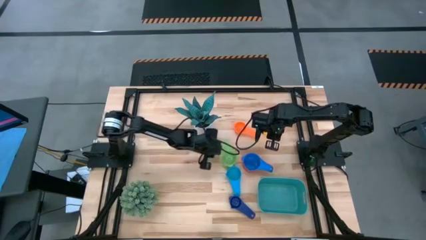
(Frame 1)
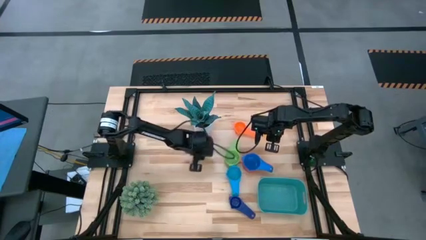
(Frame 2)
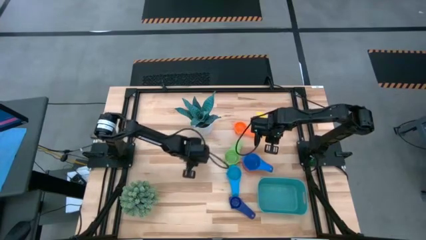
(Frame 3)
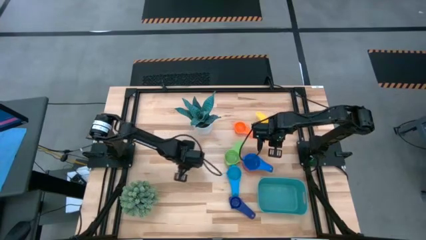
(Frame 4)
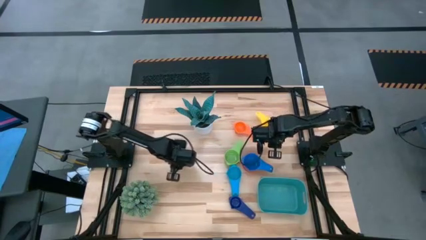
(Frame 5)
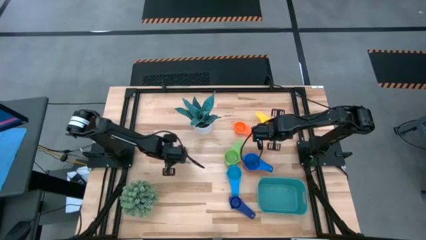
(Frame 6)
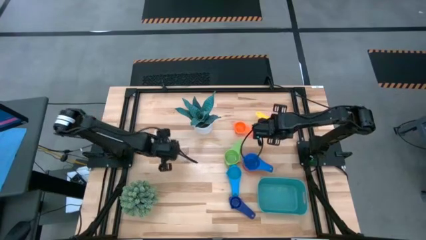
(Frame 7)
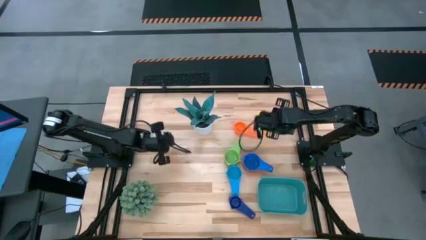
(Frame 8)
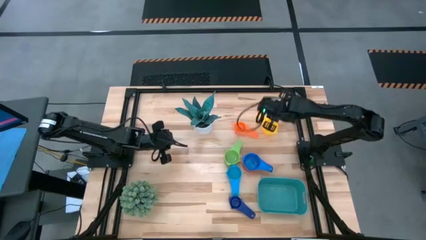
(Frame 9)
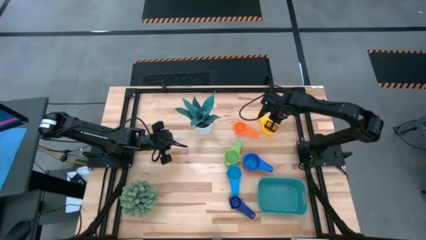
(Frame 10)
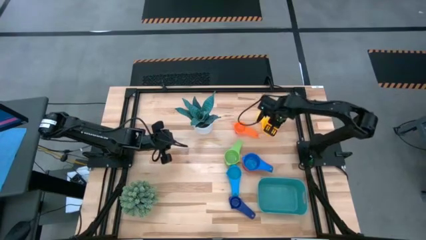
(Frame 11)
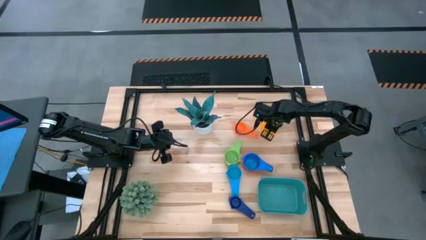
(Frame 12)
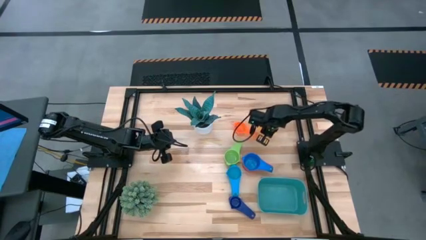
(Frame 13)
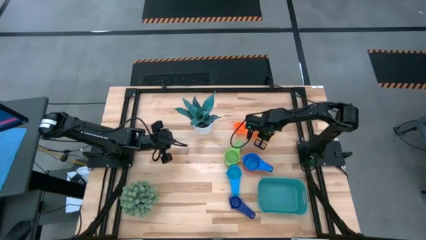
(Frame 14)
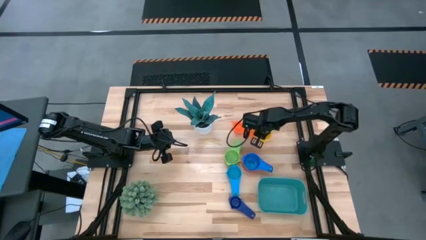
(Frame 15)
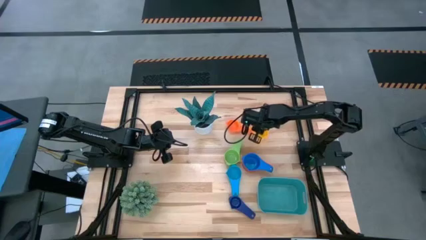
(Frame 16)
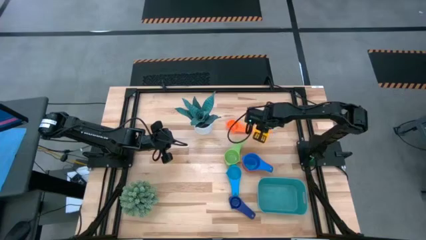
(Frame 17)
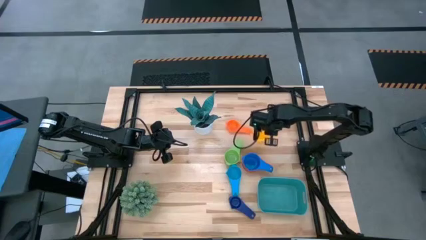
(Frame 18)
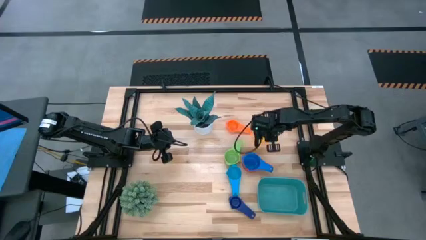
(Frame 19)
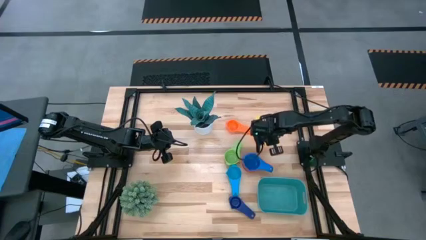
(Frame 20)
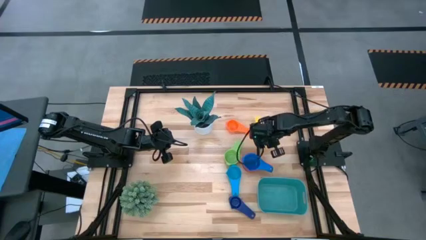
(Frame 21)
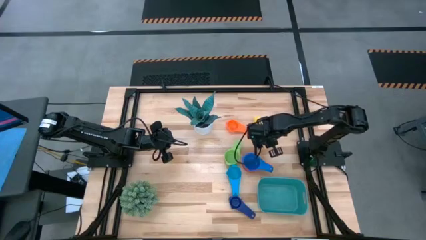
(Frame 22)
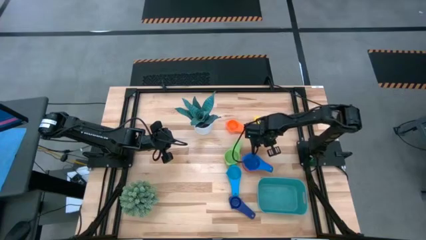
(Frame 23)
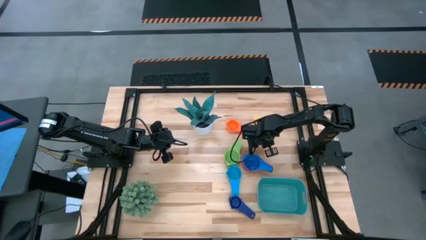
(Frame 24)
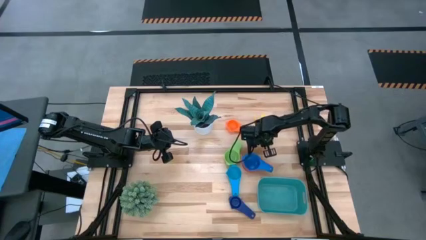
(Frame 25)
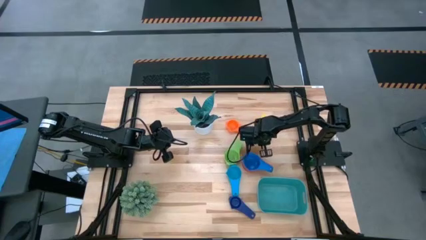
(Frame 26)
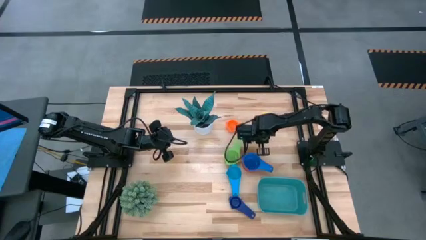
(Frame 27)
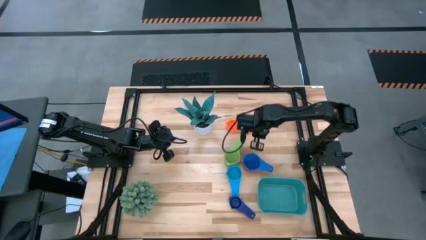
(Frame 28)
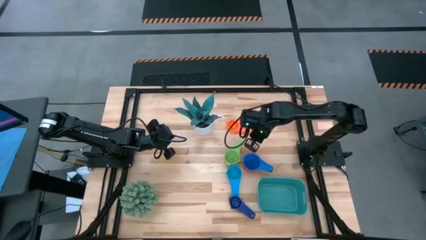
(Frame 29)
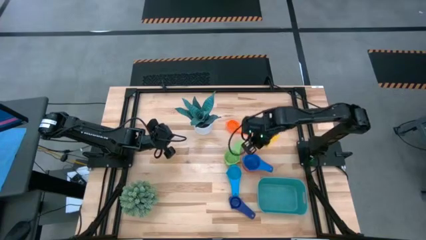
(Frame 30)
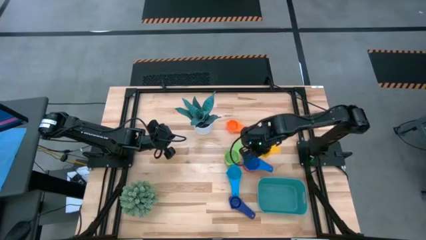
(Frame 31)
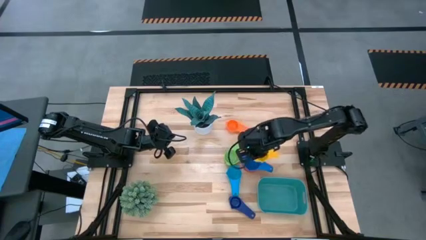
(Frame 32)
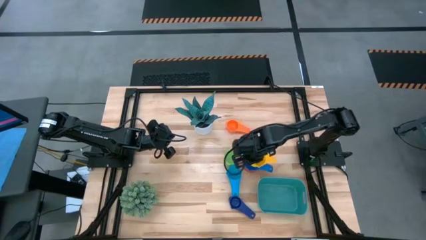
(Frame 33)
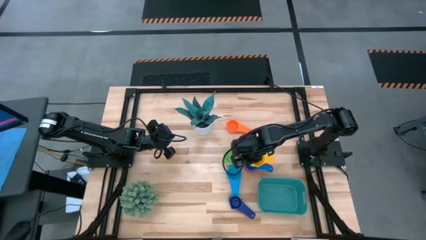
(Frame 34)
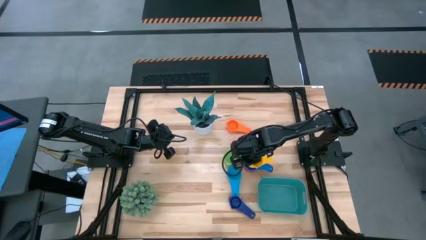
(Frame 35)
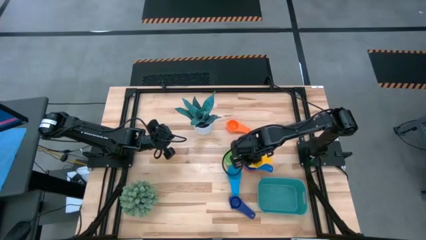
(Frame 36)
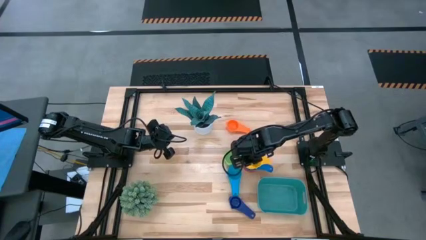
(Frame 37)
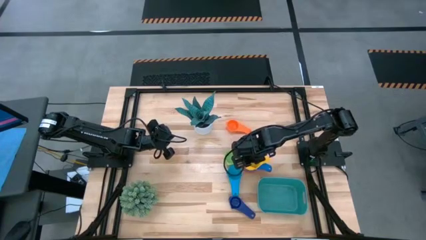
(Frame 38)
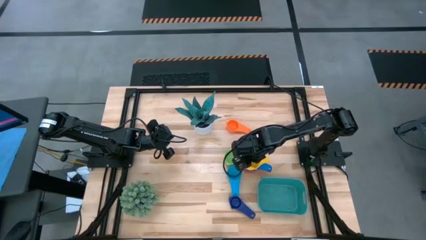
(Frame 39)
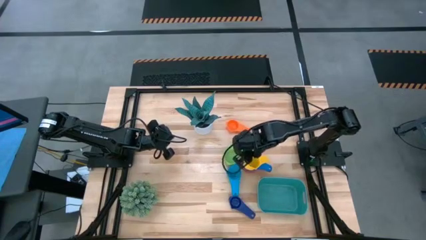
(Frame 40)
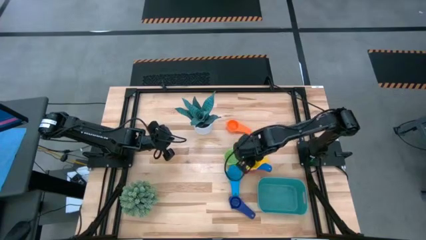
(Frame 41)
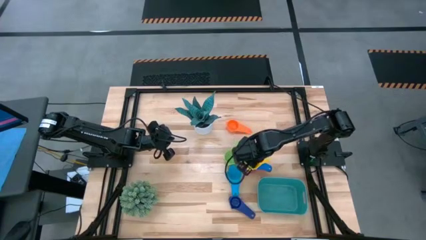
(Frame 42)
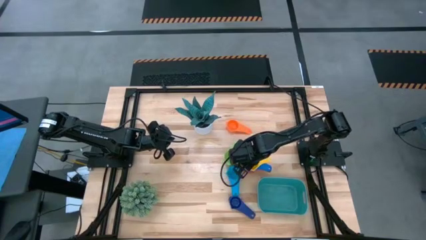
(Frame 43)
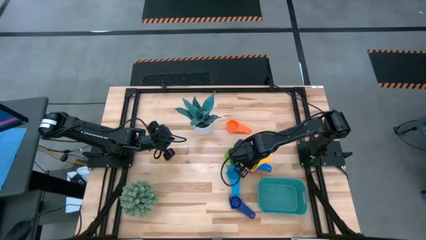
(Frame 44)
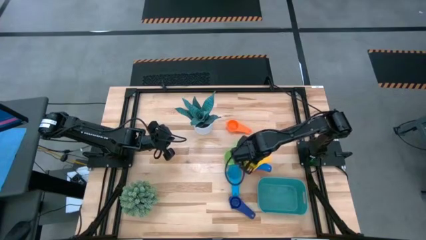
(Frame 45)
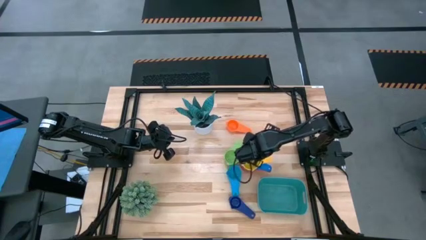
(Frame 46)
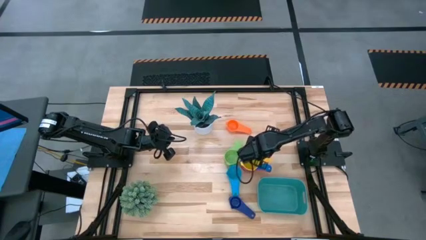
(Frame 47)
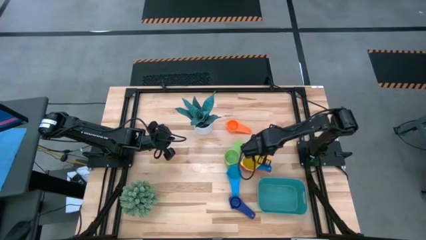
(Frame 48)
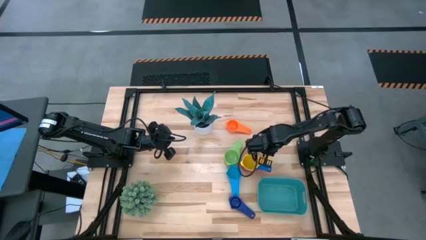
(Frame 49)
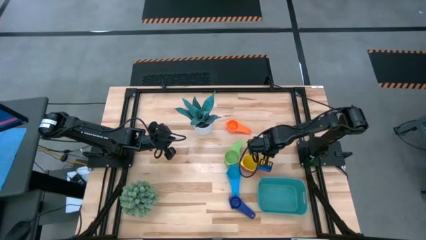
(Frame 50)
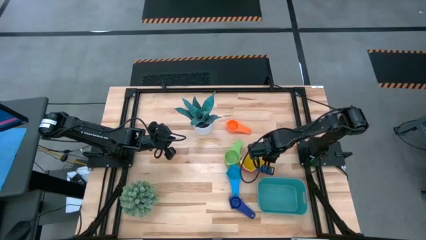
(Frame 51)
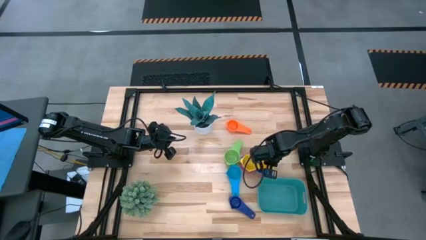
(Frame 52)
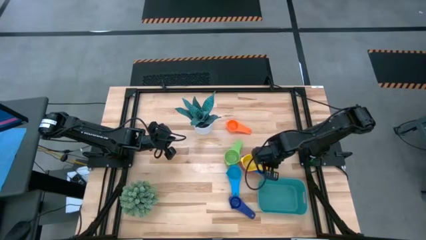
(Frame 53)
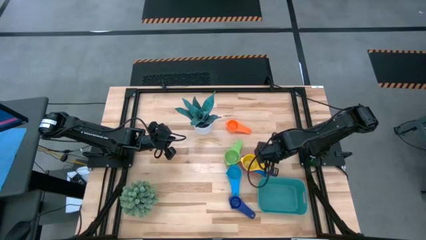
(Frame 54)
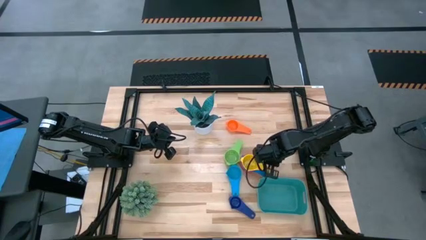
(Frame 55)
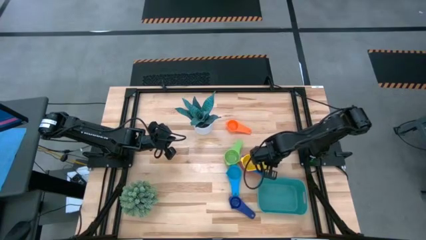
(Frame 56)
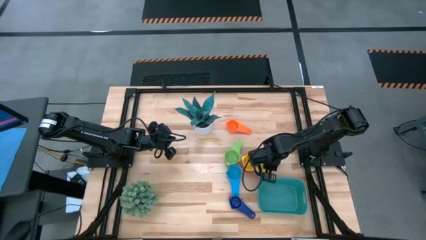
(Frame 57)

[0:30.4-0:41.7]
Task: Nest measuring cups in basket
Stack the yellow measuring cup on top of the blue measuring cup

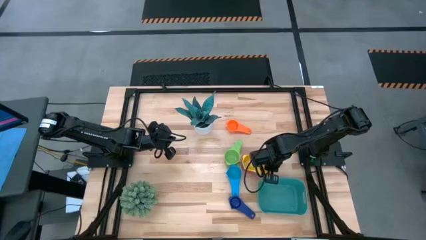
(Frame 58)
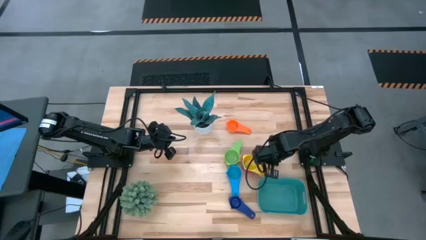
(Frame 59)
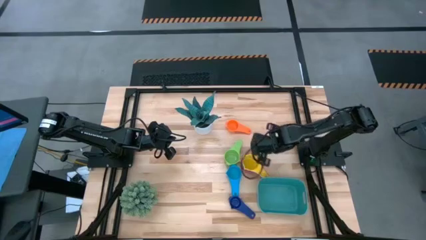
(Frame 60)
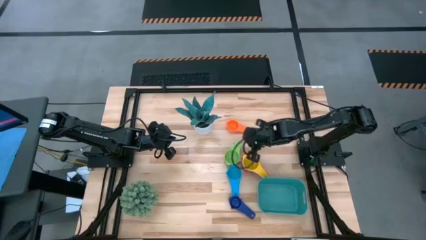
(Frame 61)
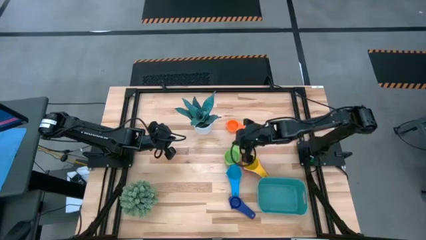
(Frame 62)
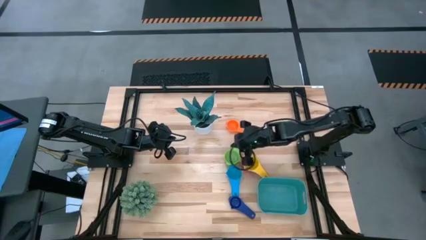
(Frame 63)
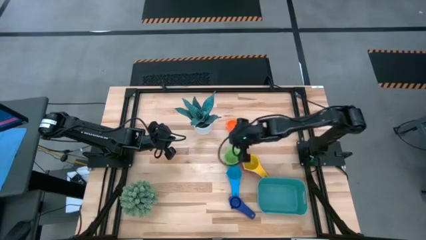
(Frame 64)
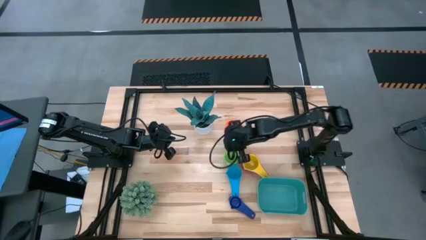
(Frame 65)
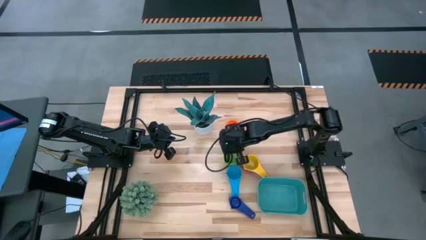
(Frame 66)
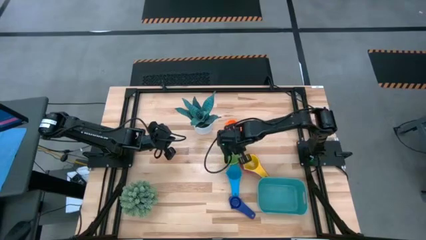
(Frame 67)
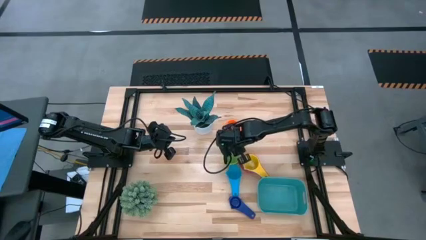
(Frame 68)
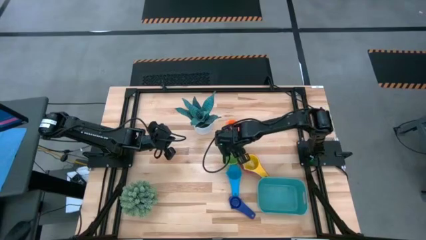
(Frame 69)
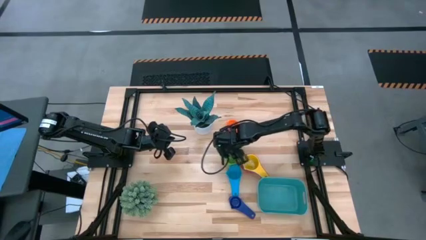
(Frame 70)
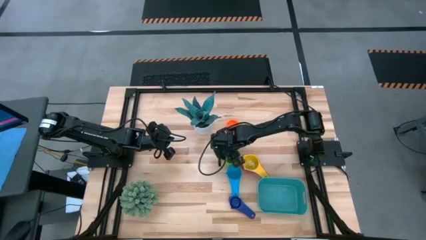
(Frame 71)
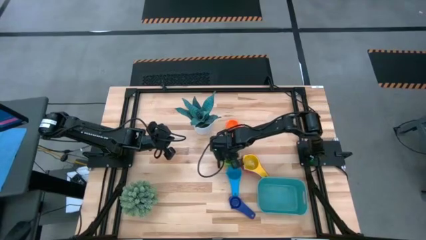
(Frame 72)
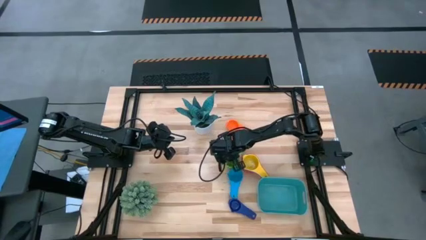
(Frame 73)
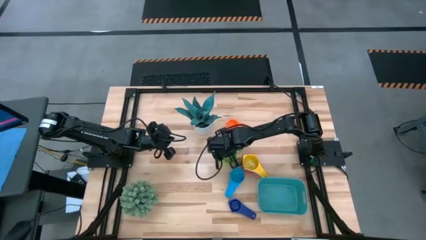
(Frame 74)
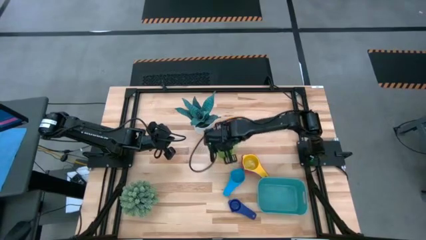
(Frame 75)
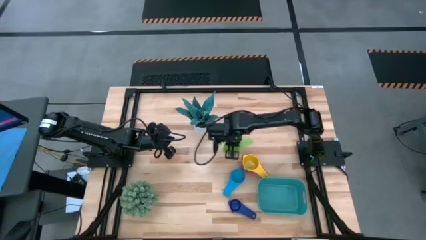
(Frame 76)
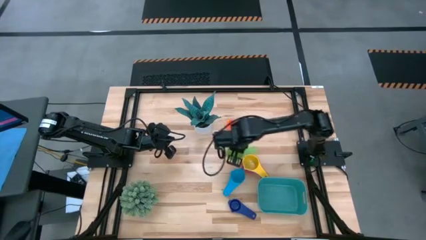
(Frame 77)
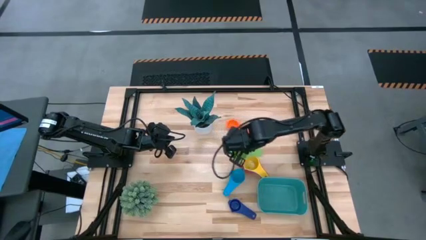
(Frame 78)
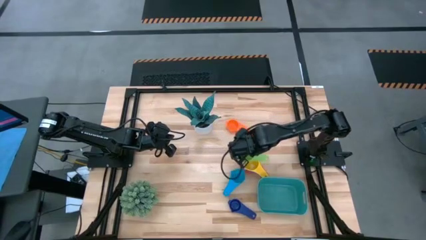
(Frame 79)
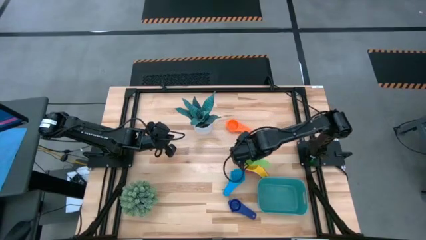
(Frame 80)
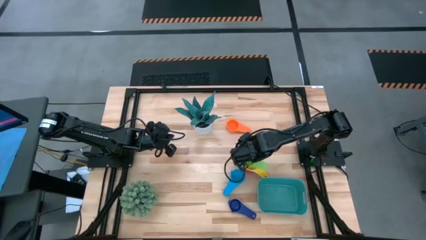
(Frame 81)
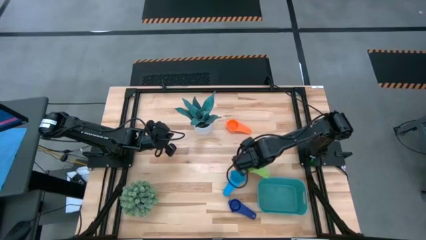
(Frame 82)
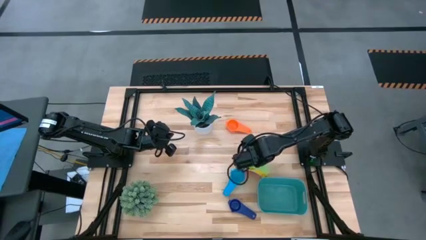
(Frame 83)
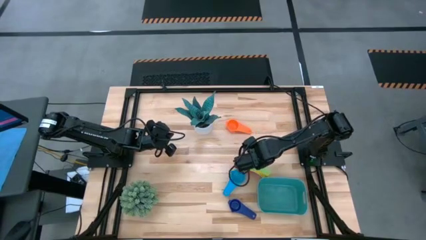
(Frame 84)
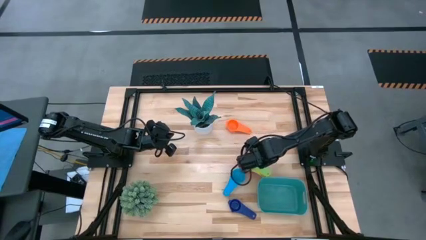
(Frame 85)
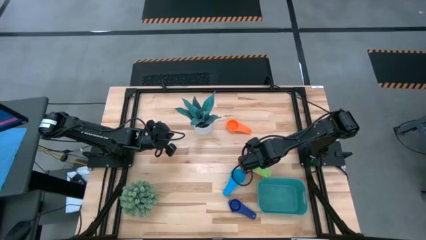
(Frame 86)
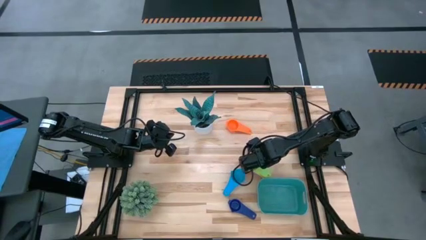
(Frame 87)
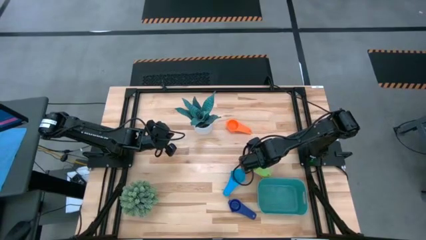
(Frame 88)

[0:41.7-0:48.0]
Stack the green measuring cup on top of the yellow measuring cup
